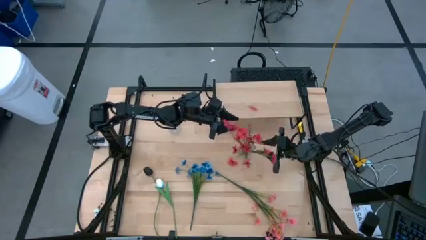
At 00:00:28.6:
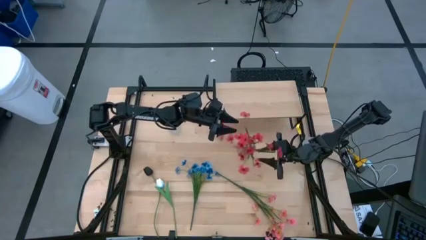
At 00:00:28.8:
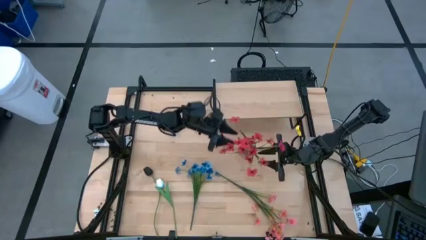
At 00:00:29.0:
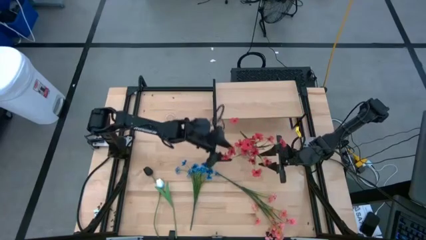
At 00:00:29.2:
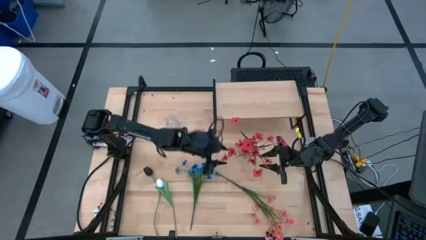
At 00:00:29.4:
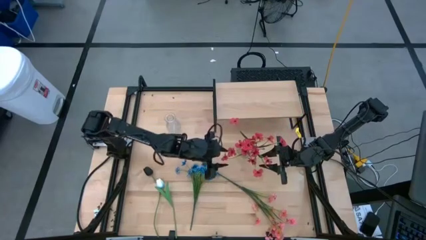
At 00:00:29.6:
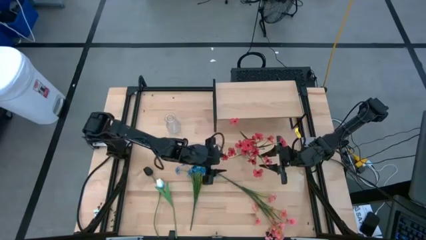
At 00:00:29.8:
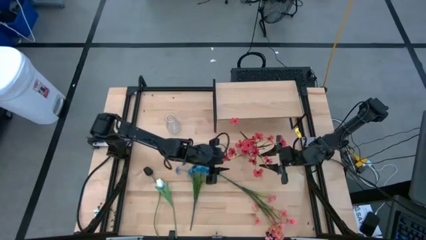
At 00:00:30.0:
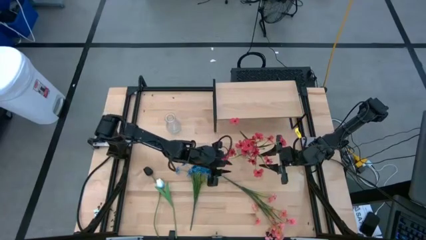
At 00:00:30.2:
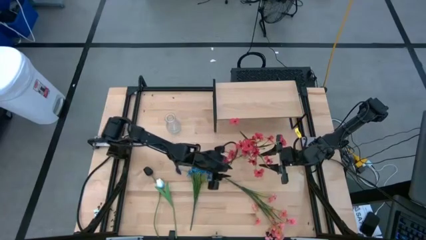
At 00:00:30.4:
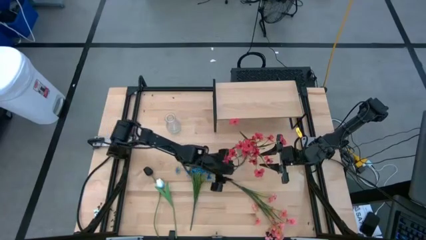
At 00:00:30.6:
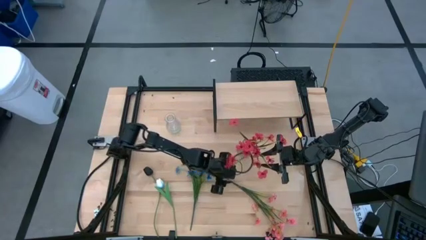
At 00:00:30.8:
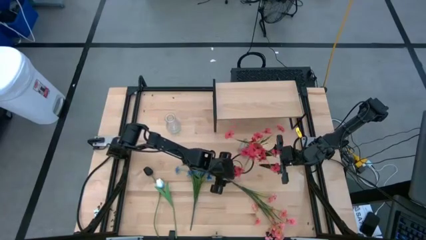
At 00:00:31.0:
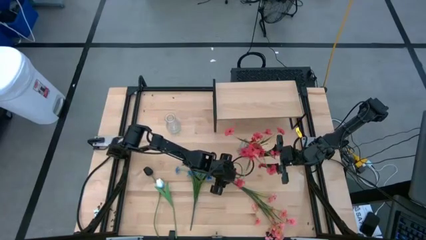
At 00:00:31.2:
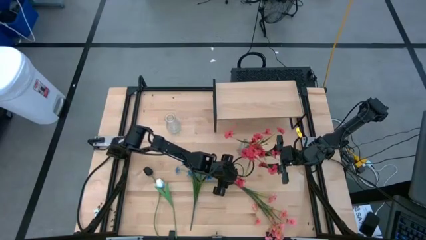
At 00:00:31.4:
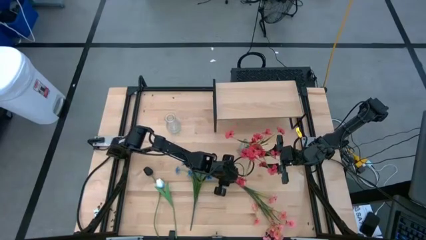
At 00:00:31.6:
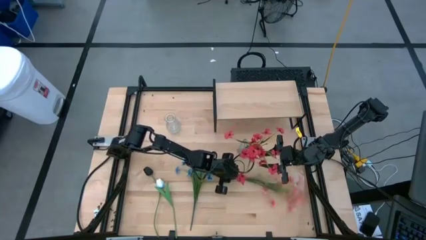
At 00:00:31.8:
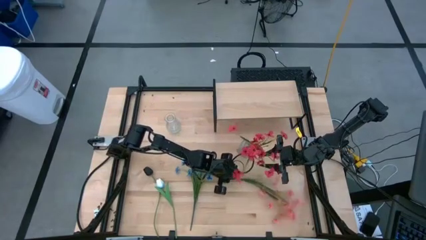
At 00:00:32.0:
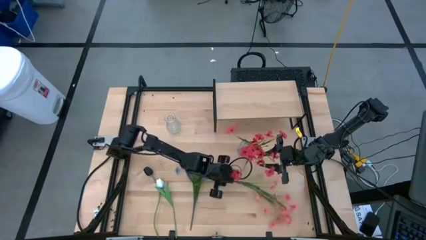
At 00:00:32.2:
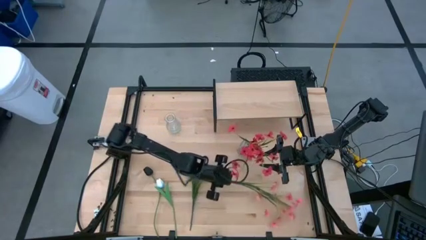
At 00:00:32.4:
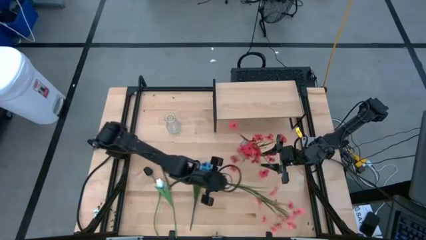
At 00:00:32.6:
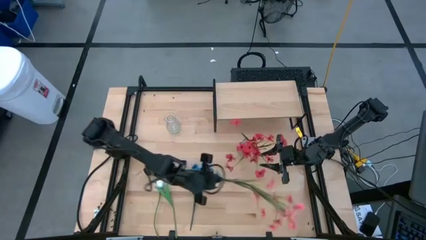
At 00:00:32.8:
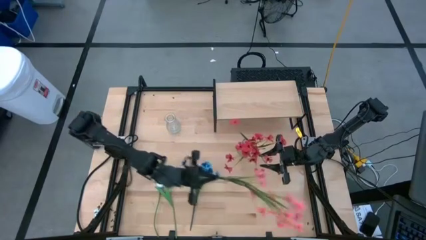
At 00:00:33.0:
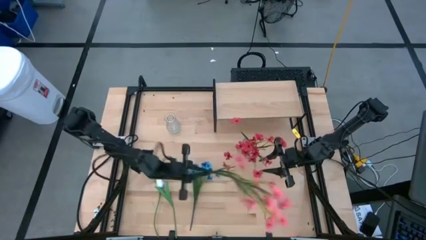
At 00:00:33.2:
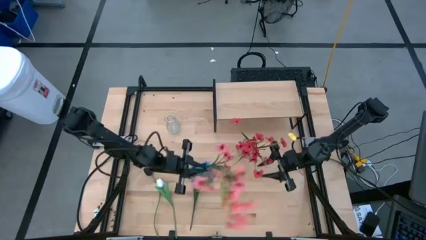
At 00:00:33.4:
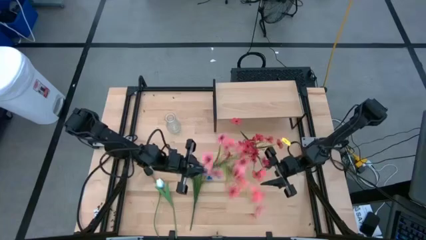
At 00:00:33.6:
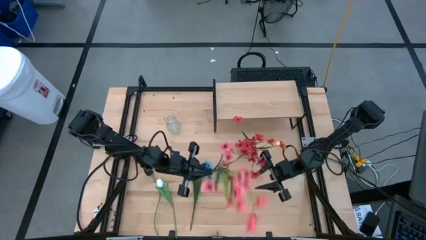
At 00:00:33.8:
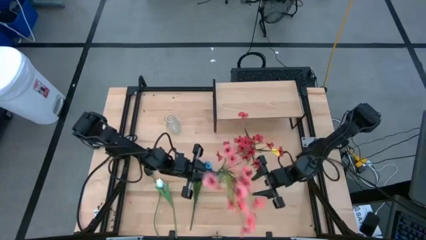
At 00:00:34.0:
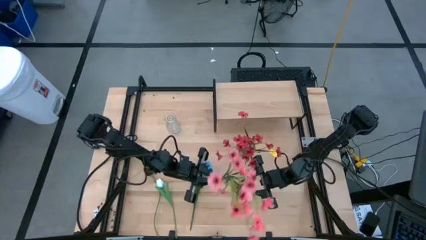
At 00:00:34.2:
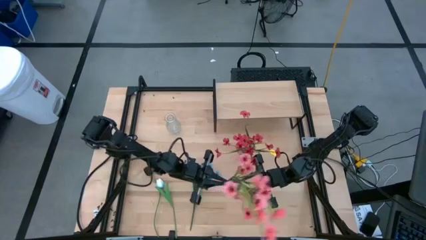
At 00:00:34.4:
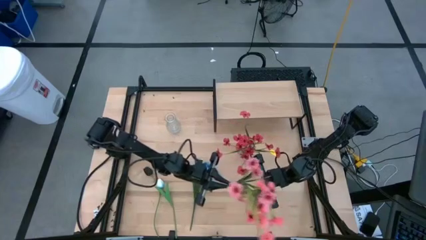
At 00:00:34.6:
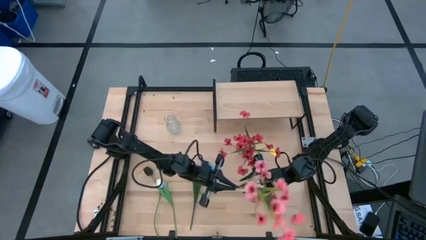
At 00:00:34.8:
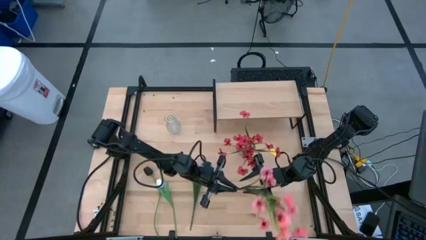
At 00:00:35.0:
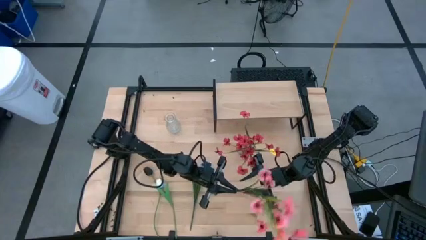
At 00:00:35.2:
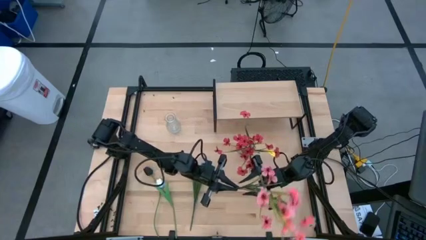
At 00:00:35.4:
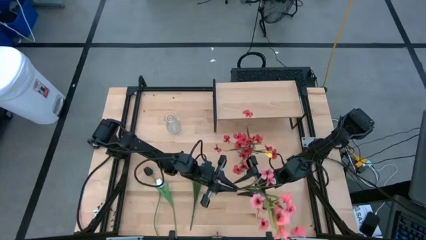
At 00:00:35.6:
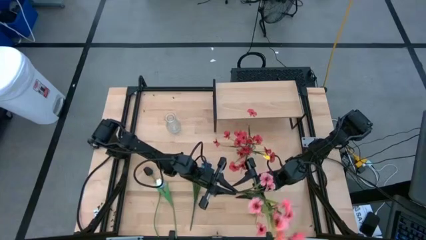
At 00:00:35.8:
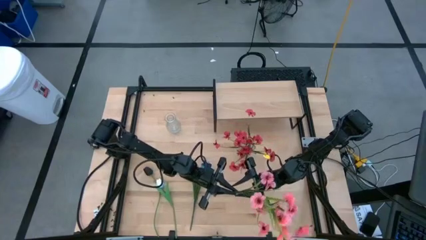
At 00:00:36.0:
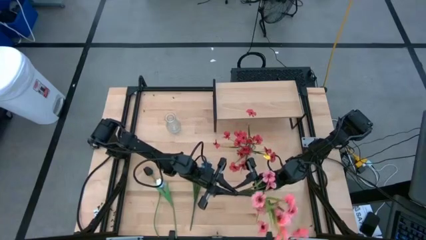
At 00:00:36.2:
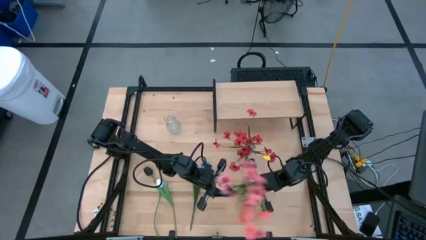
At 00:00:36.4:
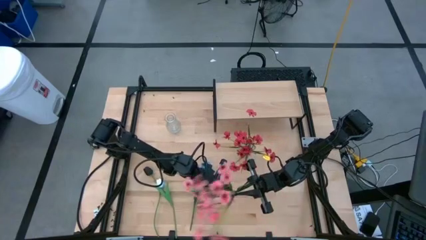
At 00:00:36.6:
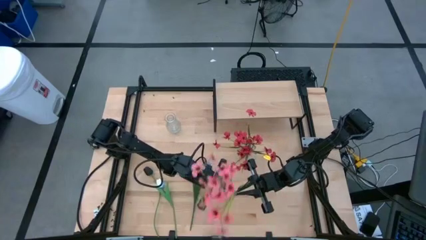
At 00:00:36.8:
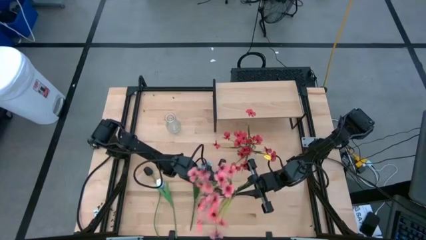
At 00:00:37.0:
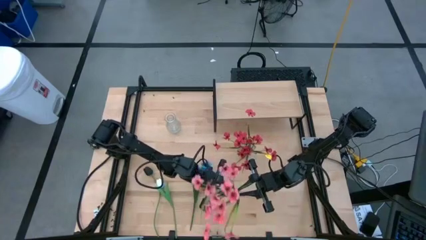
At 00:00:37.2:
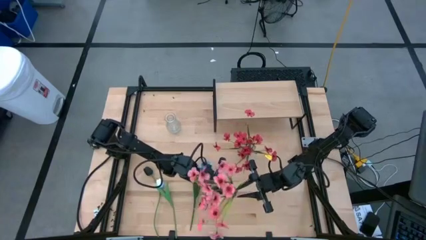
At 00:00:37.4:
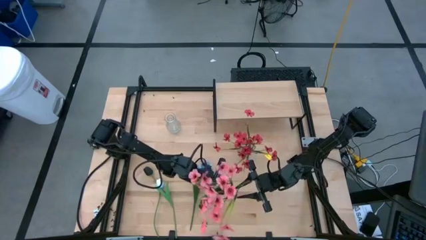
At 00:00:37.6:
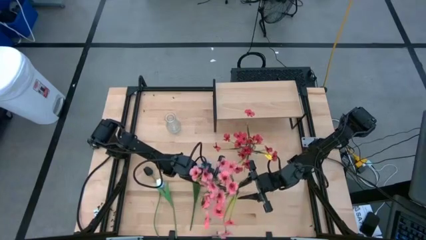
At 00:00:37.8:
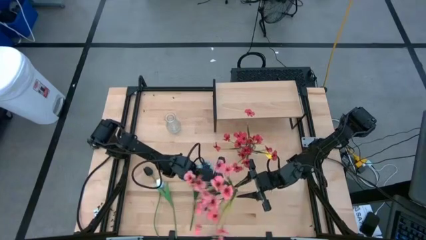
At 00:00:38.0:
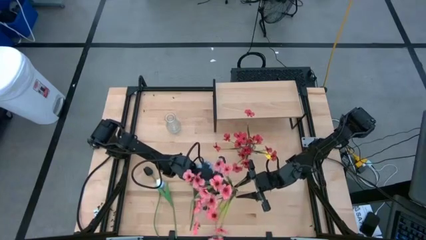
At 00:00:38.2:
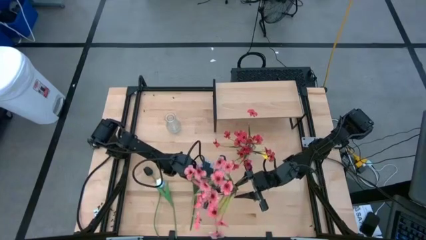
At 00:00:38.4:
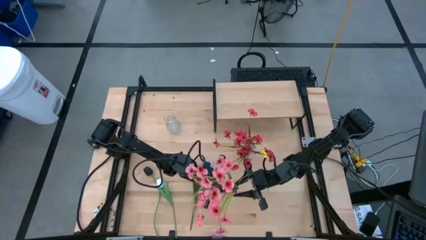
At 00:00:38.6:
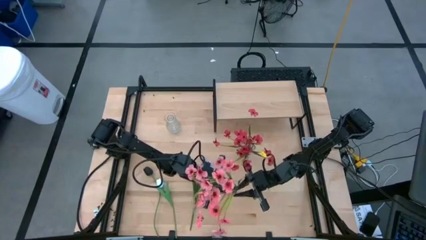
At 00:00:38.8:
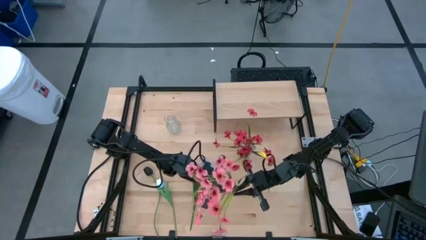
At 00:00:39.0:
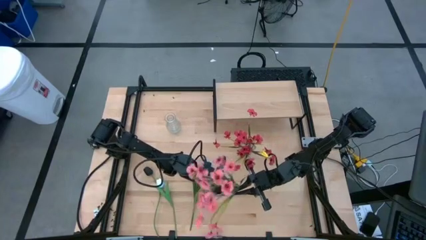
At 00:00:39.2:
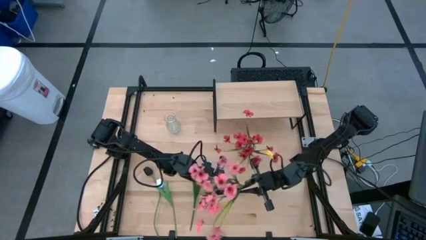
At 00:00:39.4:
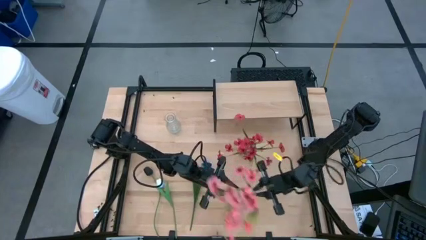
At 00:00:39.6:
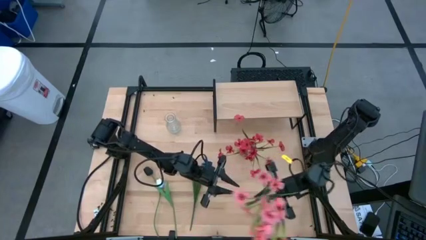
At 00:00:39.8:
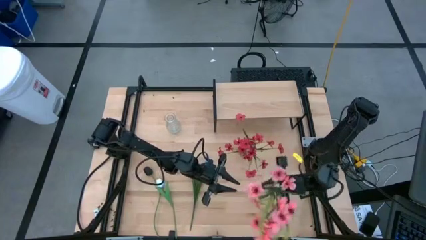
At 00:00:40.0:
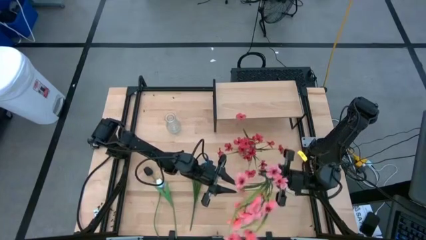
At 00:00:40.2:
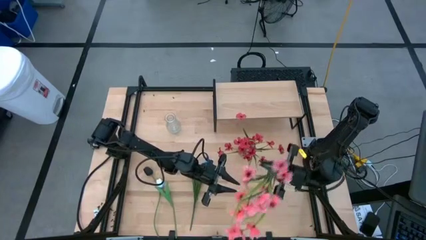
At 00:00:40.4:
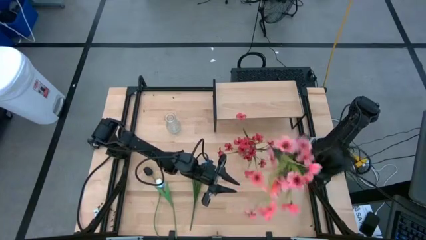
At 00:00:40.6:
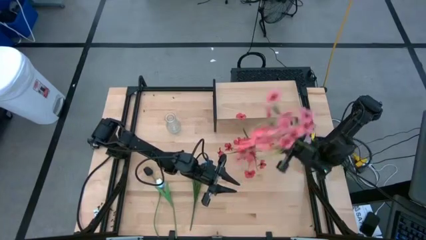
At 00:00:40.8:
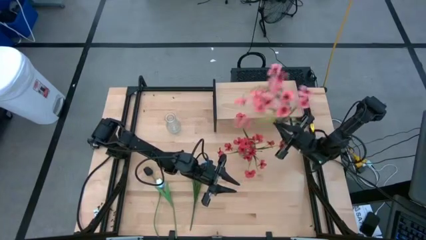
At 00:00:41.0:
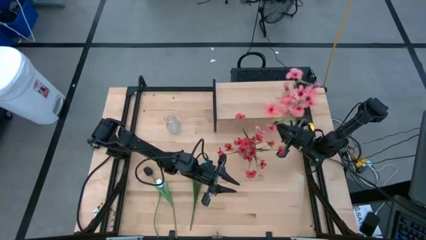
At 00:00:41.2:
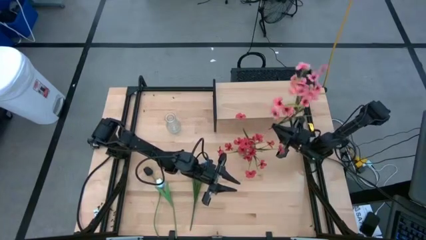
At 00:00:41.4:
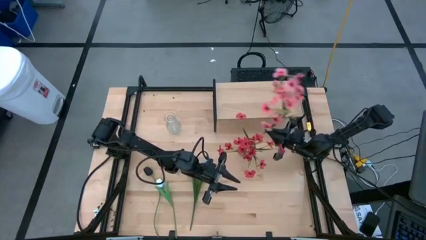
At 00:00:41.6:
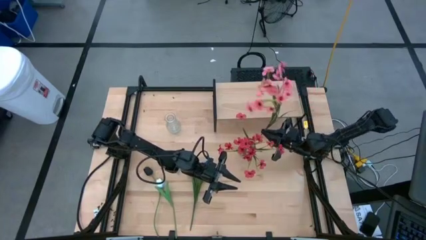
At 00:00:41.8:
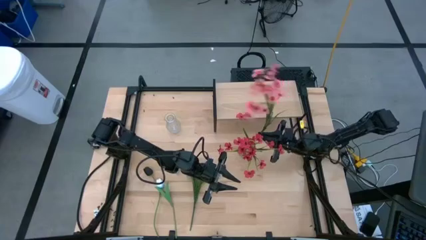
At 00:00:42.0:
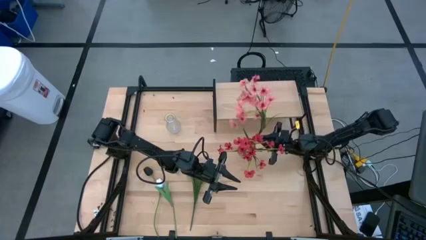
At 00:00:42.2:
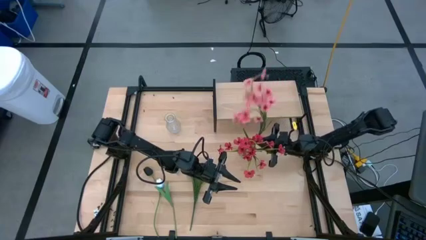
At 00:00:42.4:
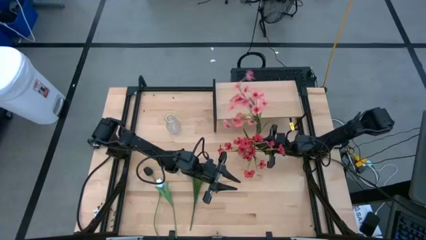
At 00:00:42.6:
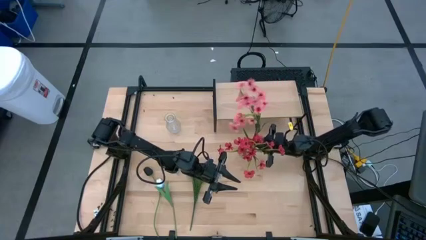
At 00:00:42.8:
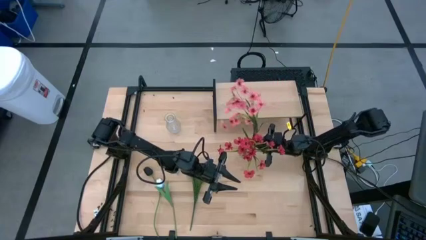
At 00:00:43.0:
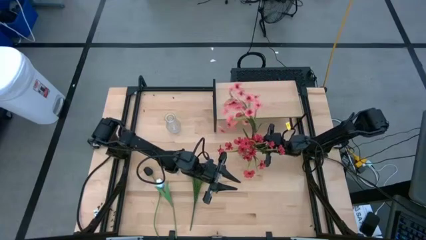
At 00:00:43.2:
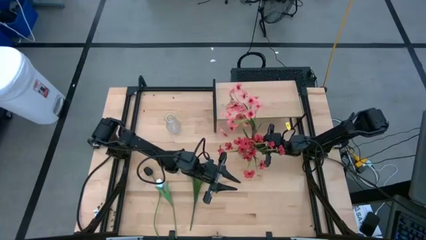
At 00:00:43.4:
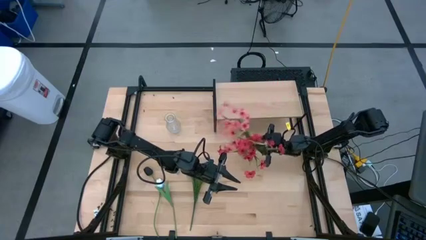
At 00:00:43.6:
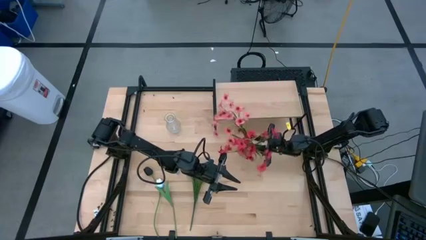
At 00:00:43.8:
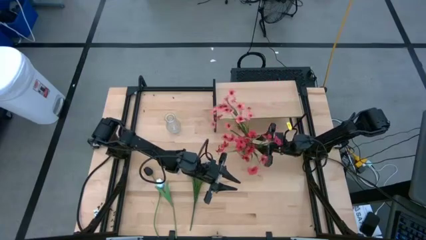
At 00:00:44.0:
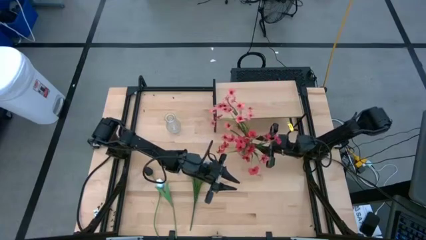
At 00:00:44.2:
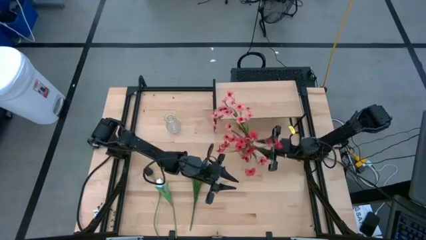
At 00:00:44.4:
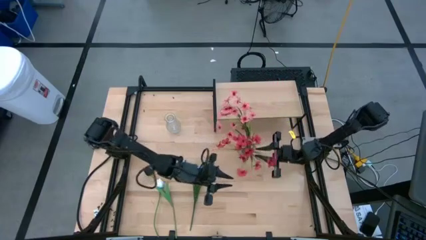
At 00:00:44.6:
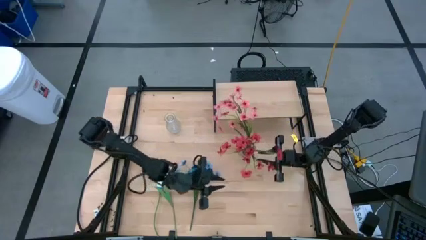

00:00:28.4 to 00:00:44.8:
Task: Pick and place flowers into a vace then onto a shelf
Put the pink flowers into the right transparent vase
